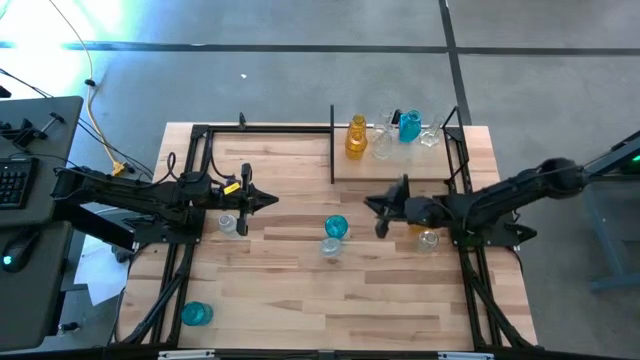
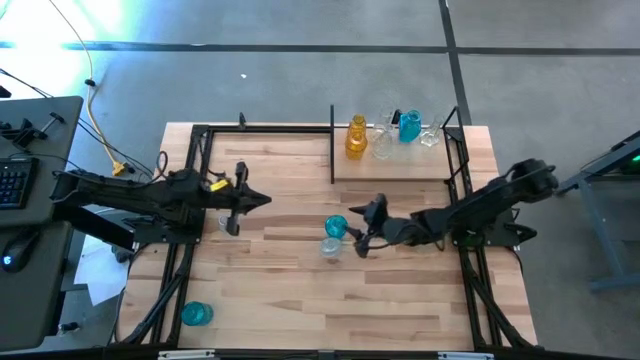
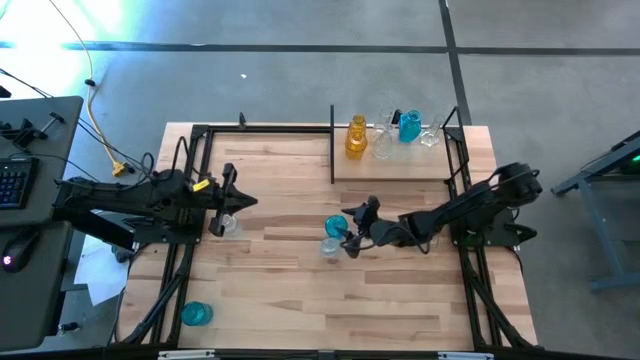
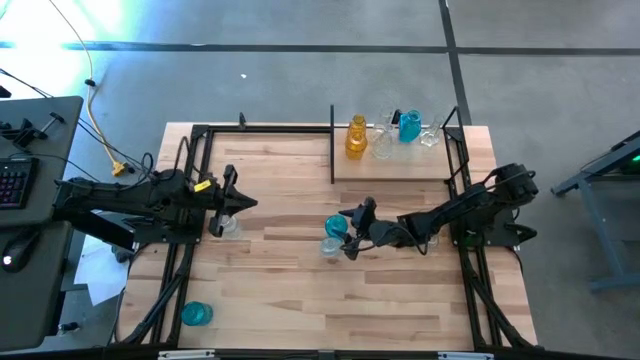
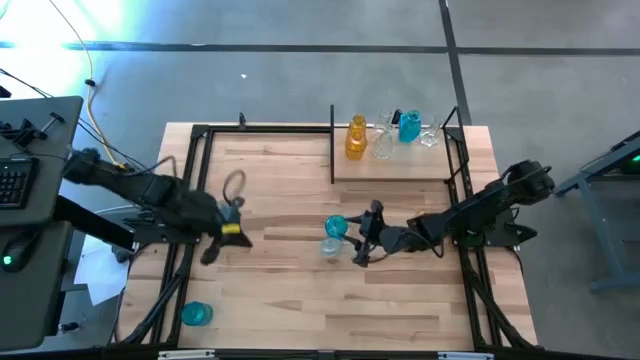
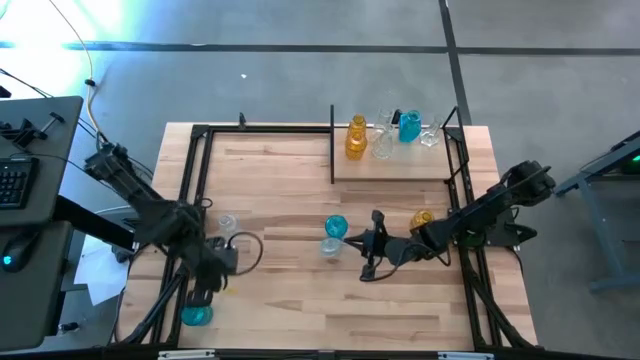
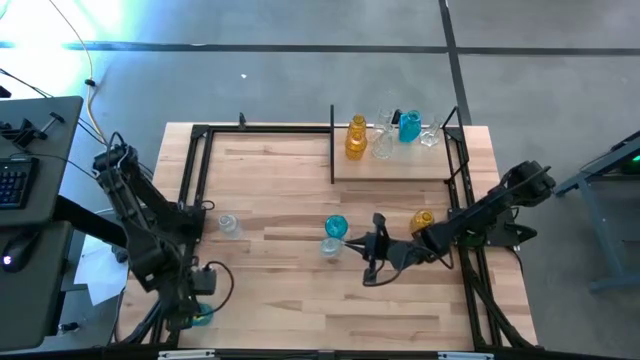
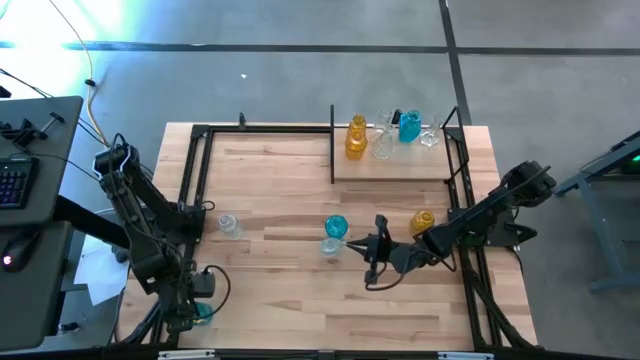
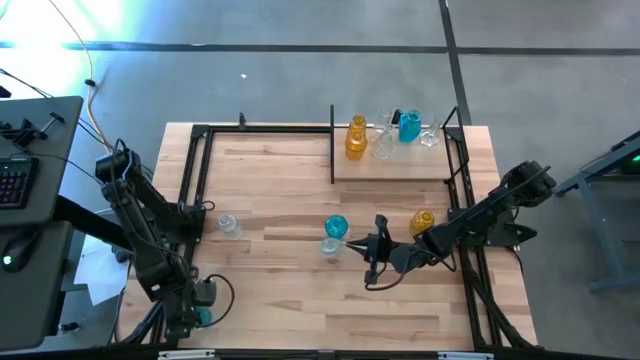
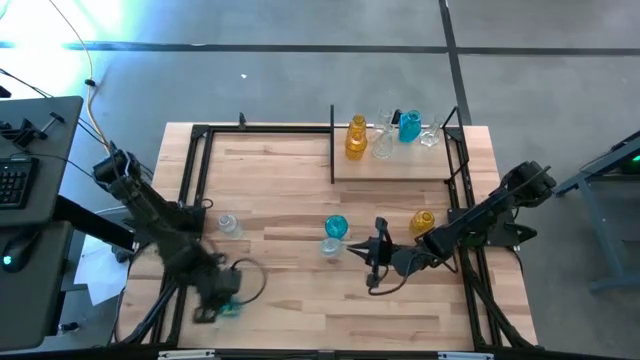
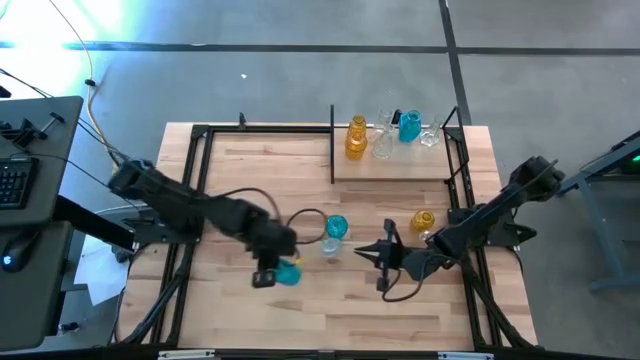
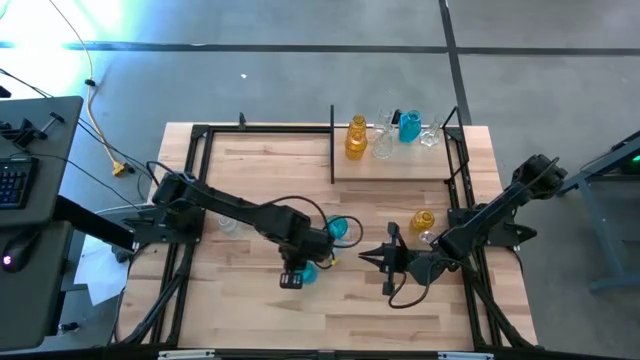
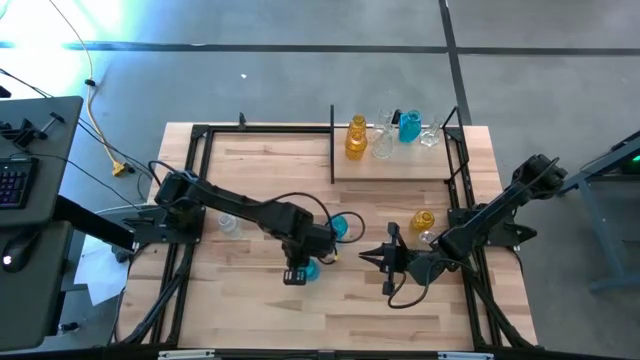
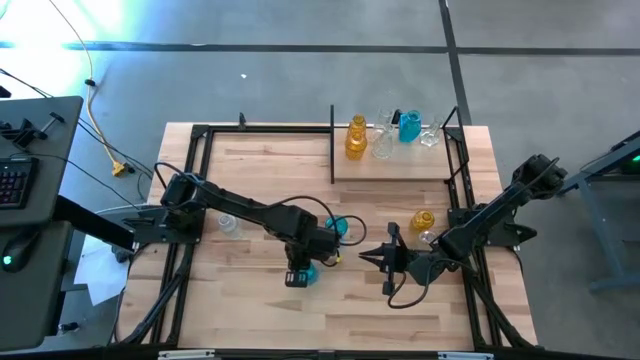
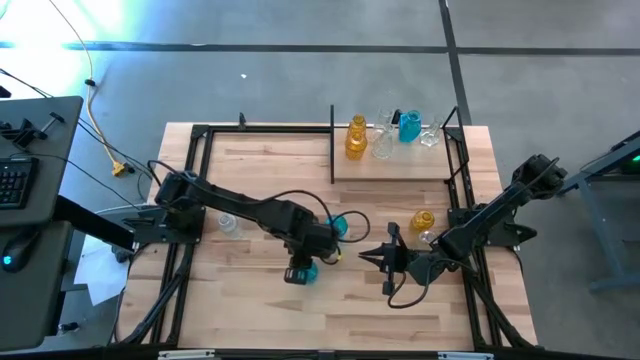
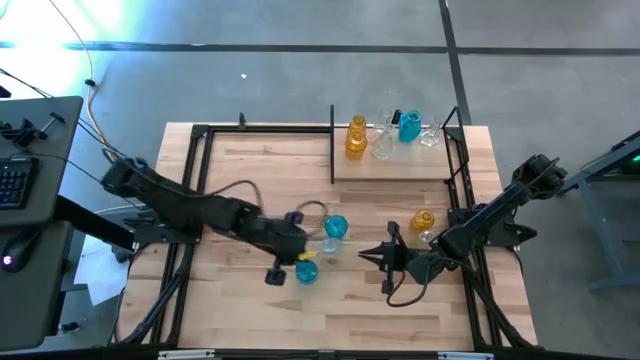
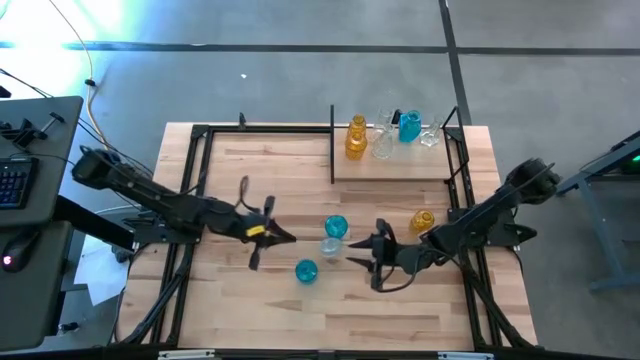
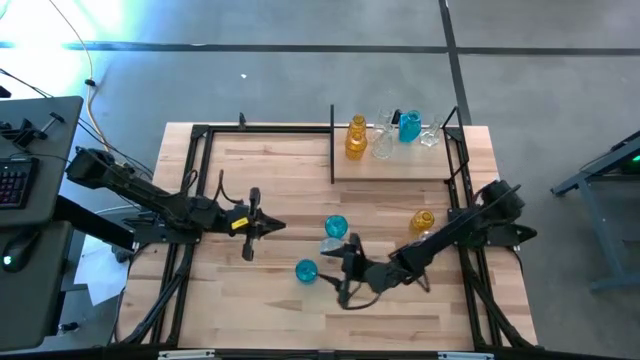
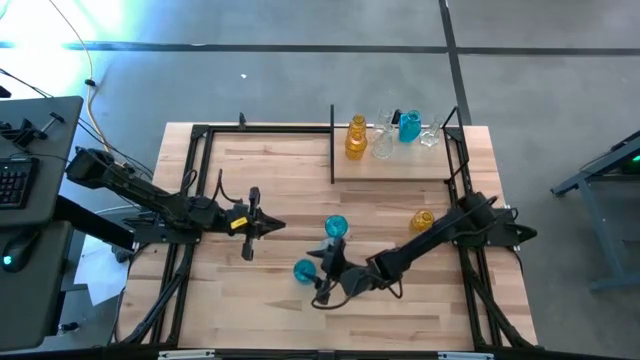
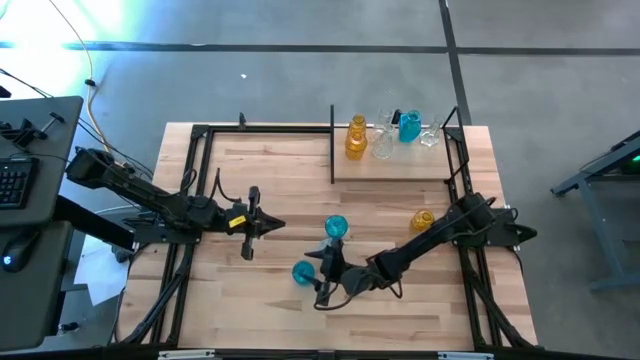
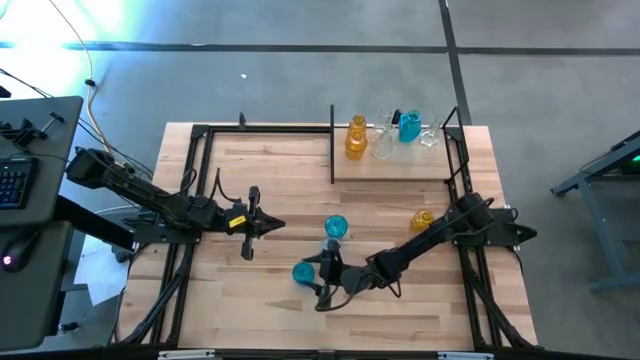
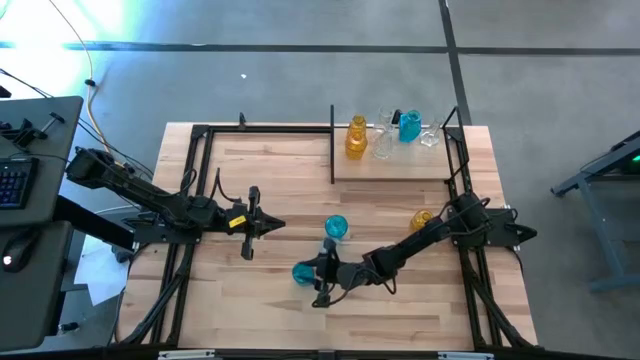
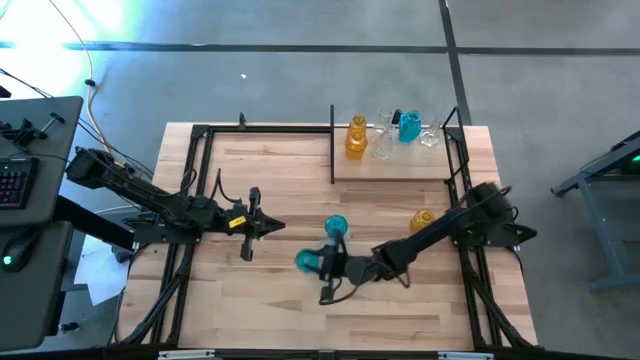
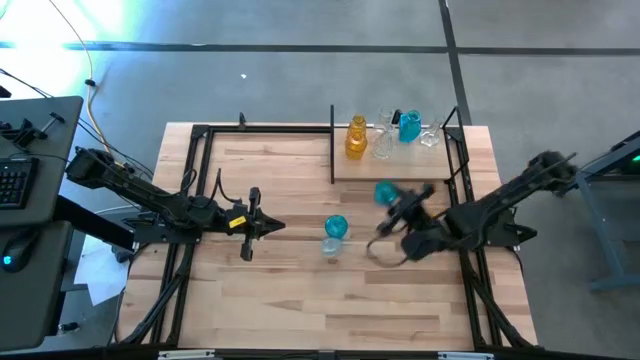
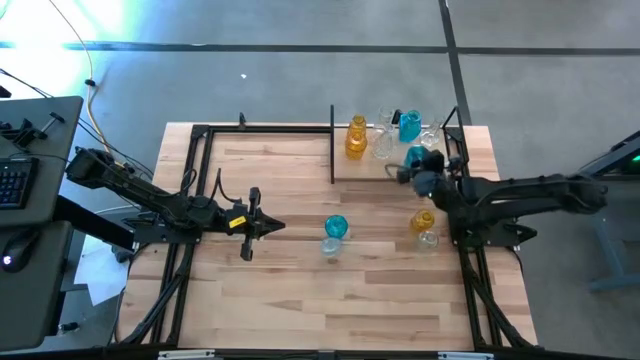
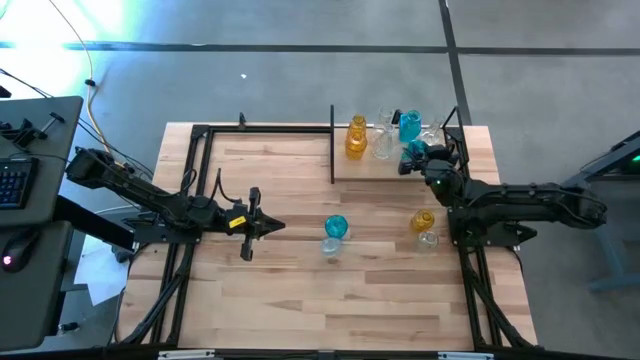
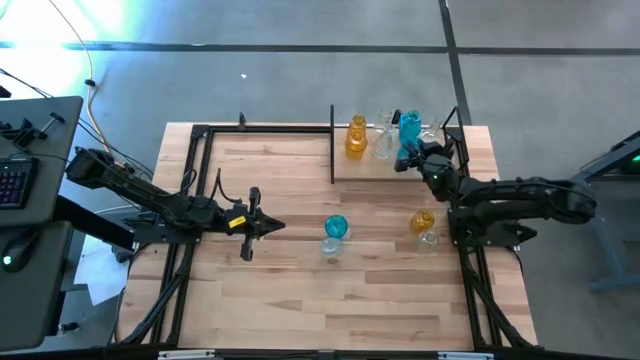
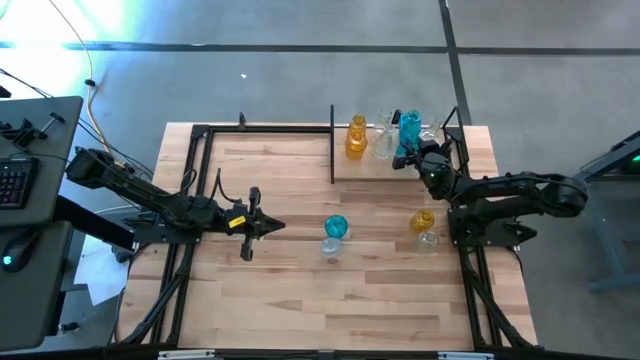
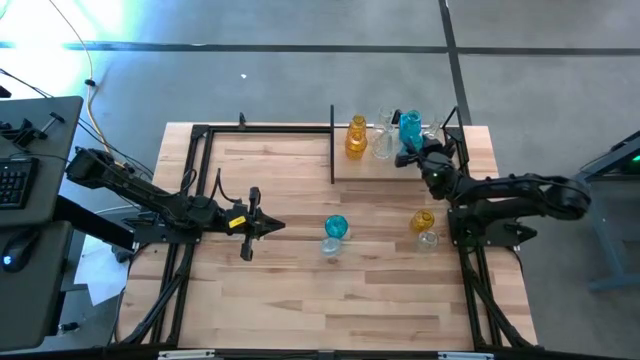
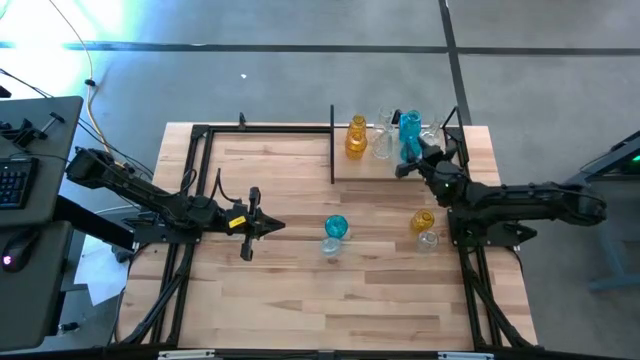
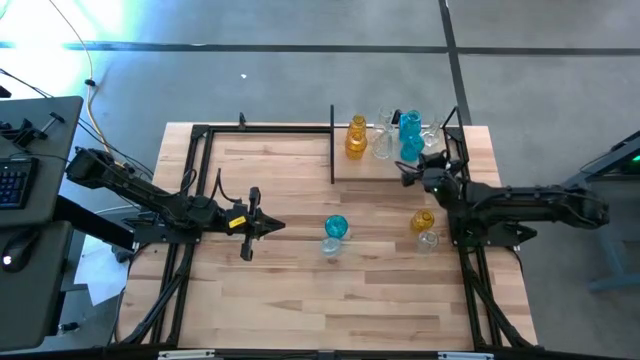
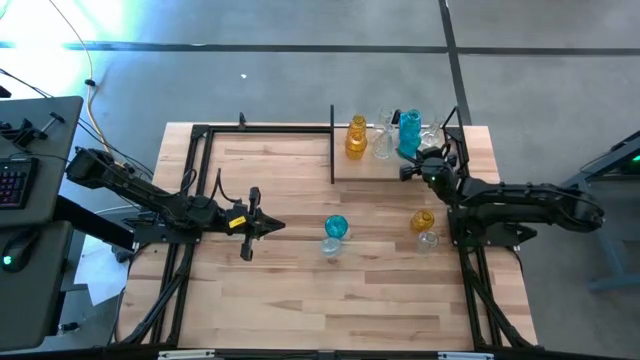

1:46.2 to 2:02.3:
Task: sort vases onto shelf
Put the bottom blue vase on the shelf aligned with the other blue vase
